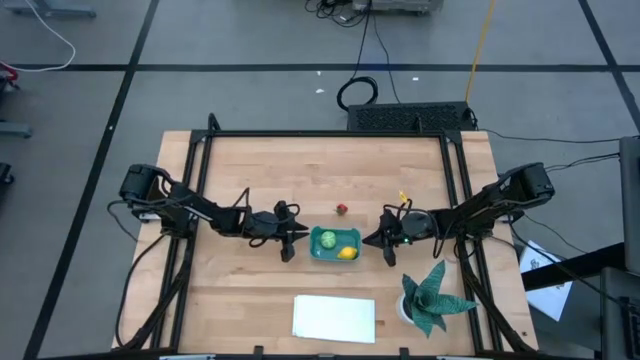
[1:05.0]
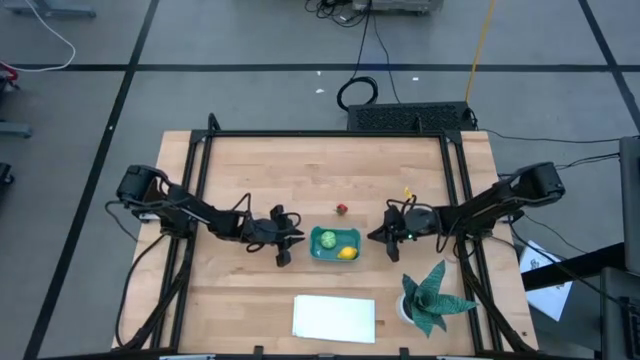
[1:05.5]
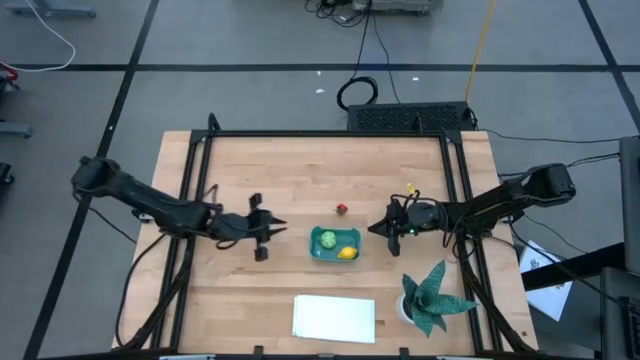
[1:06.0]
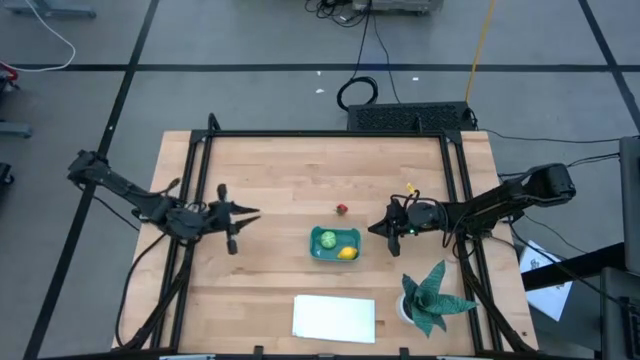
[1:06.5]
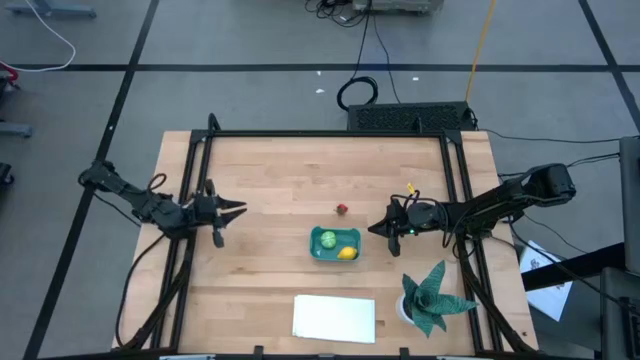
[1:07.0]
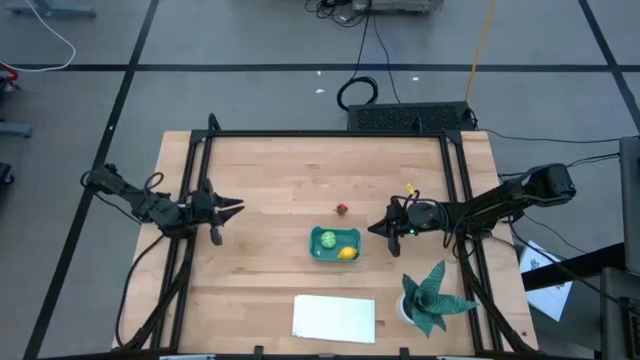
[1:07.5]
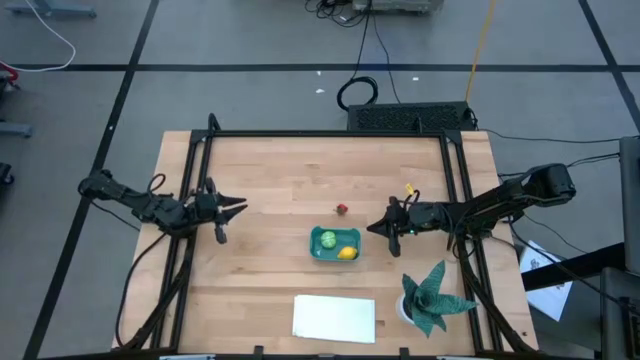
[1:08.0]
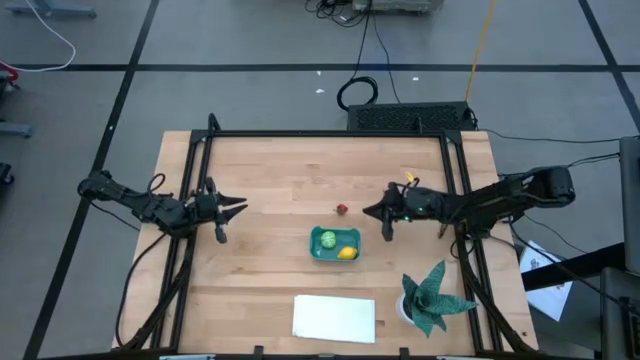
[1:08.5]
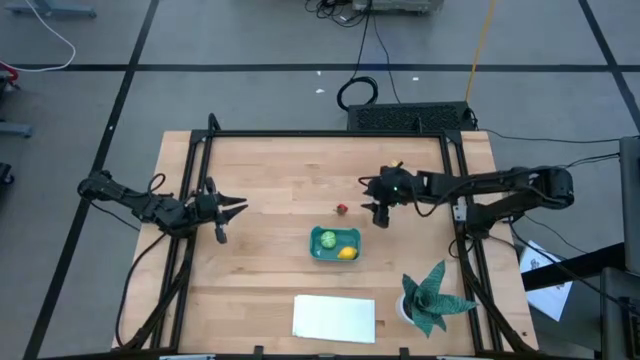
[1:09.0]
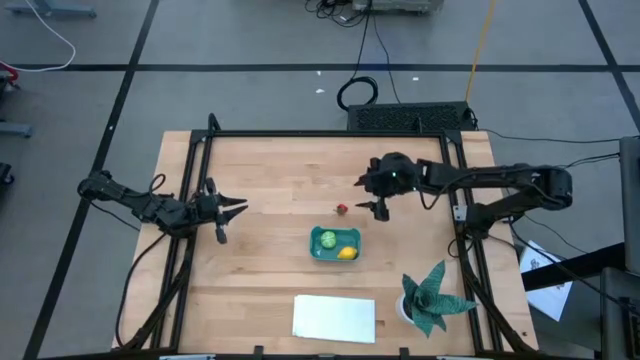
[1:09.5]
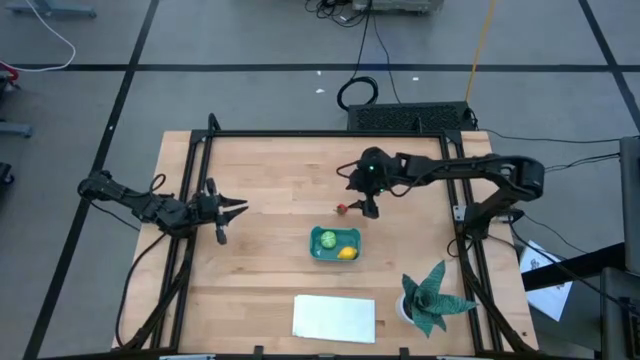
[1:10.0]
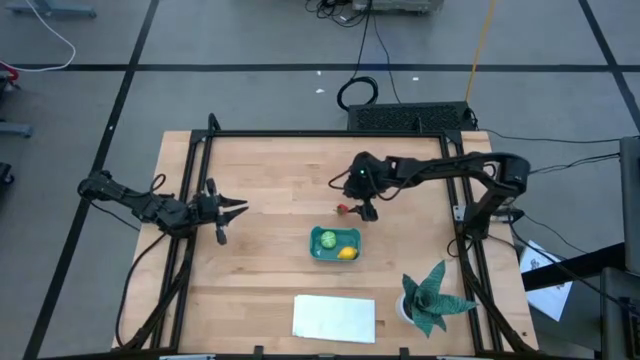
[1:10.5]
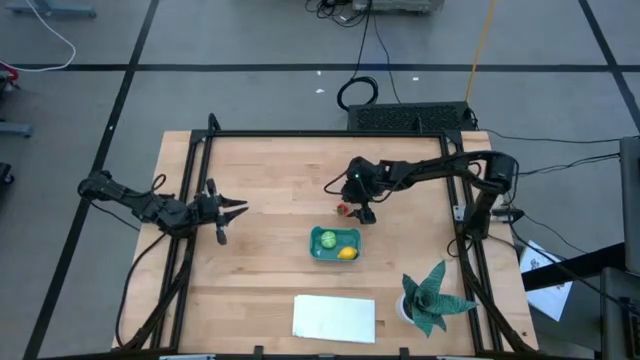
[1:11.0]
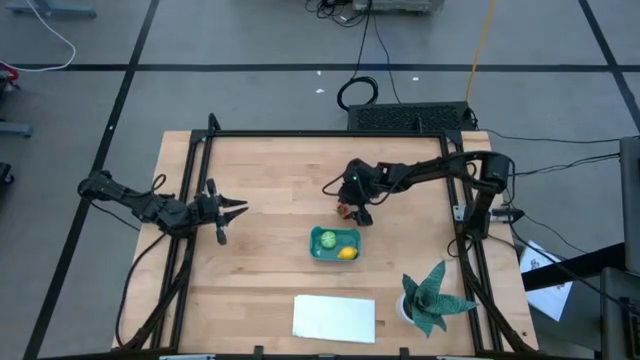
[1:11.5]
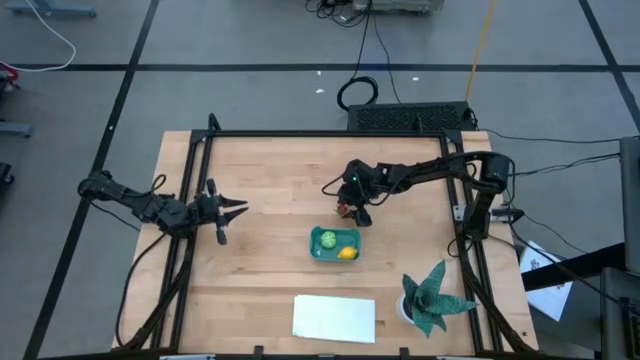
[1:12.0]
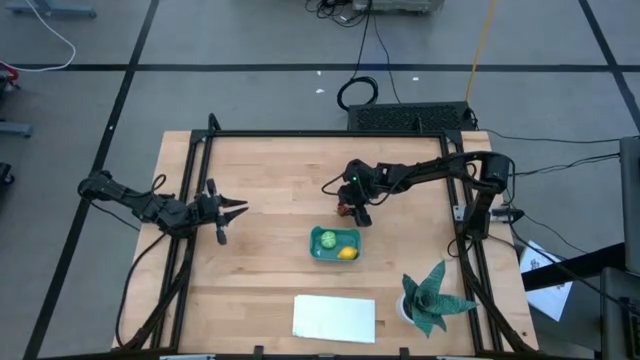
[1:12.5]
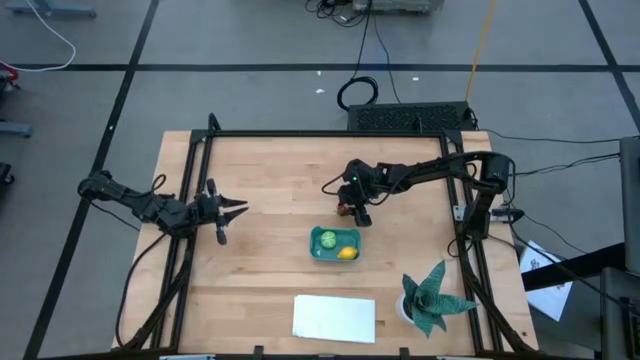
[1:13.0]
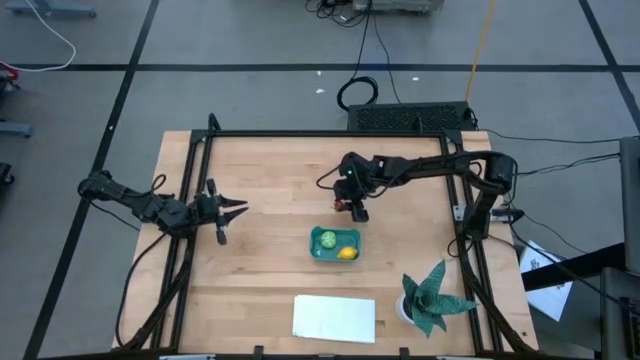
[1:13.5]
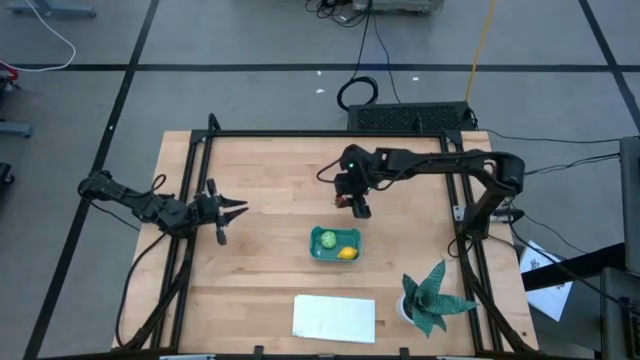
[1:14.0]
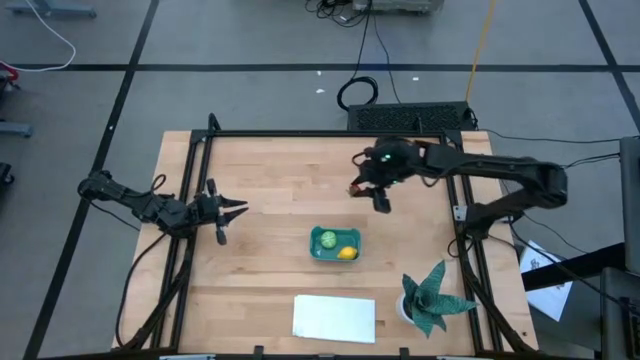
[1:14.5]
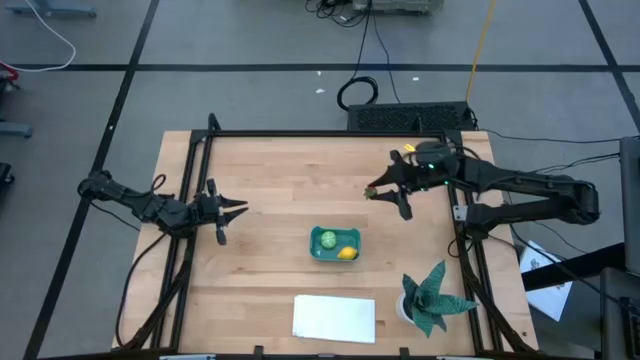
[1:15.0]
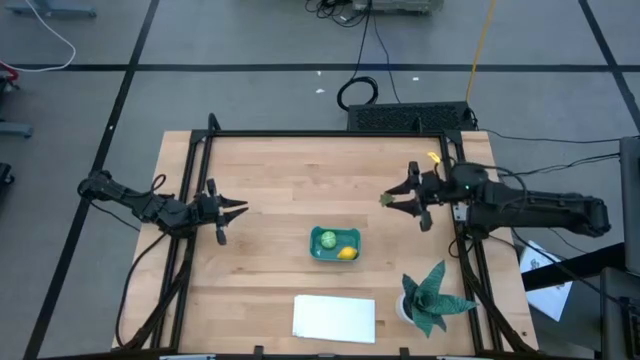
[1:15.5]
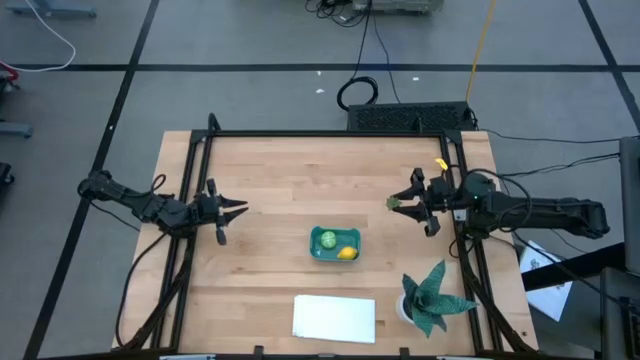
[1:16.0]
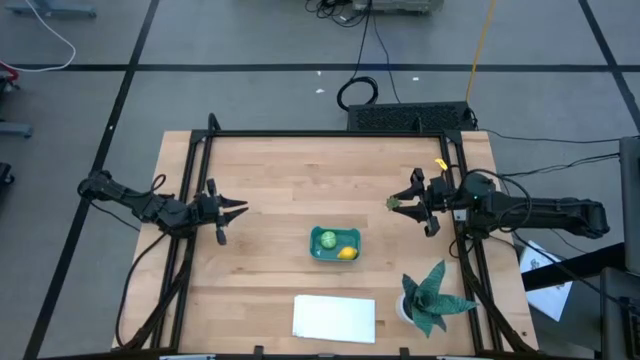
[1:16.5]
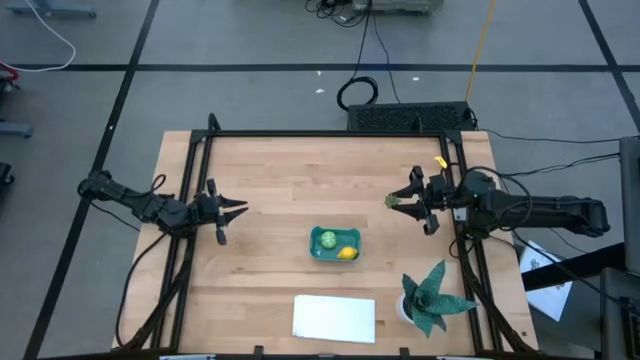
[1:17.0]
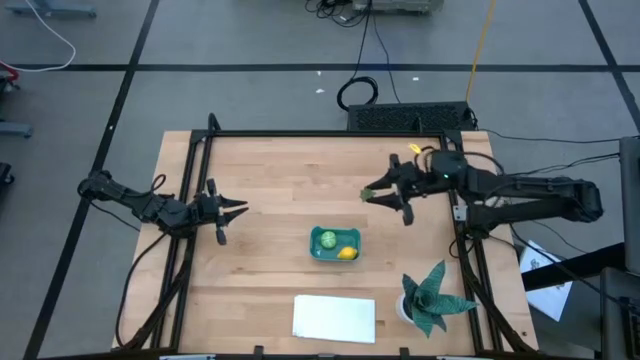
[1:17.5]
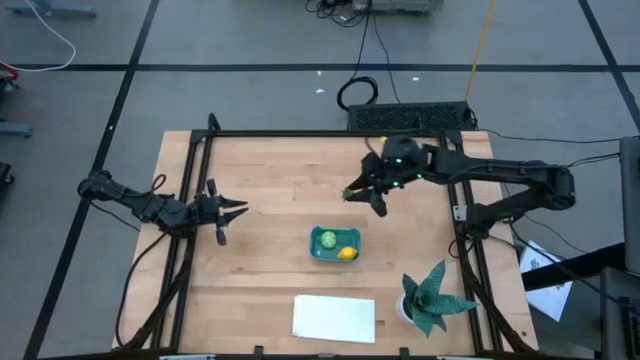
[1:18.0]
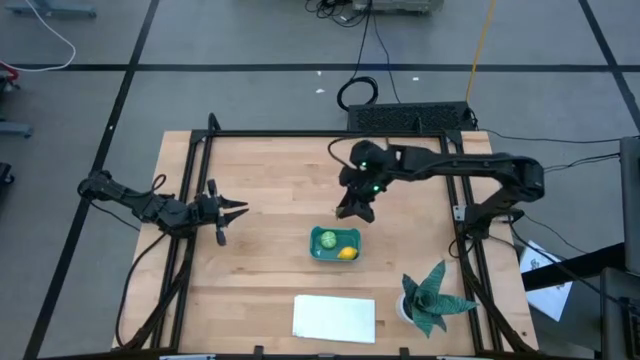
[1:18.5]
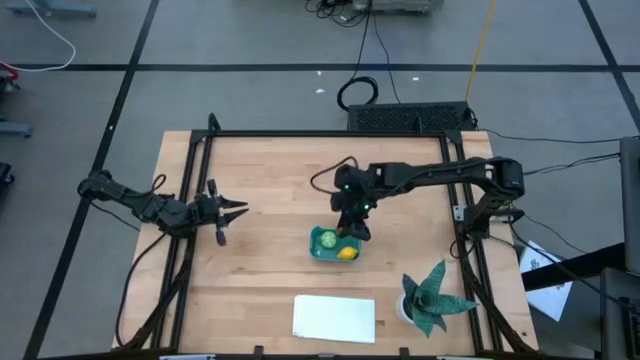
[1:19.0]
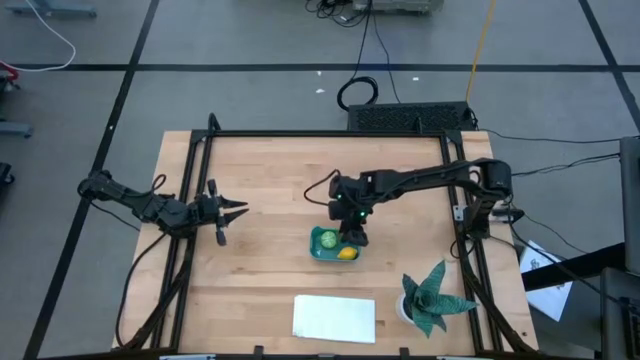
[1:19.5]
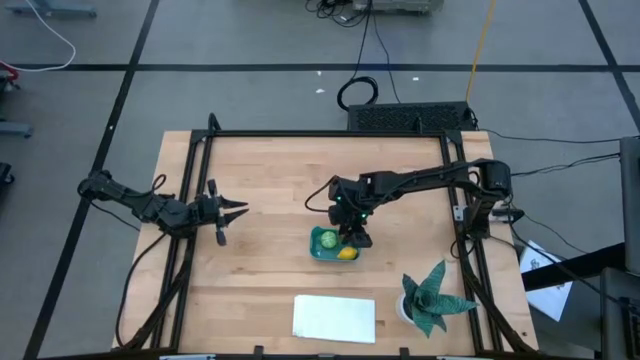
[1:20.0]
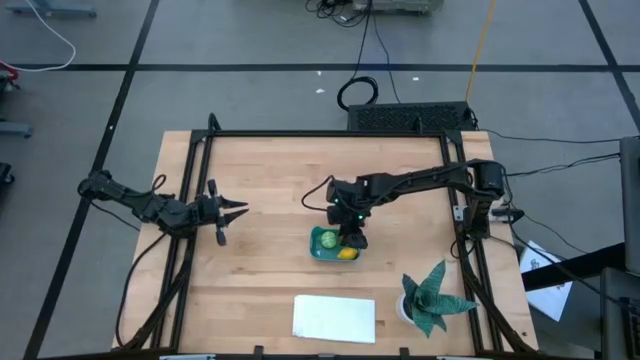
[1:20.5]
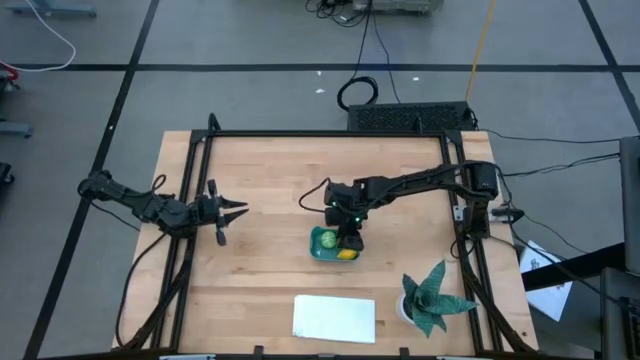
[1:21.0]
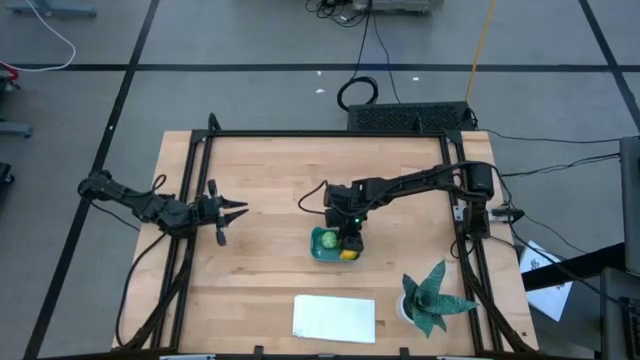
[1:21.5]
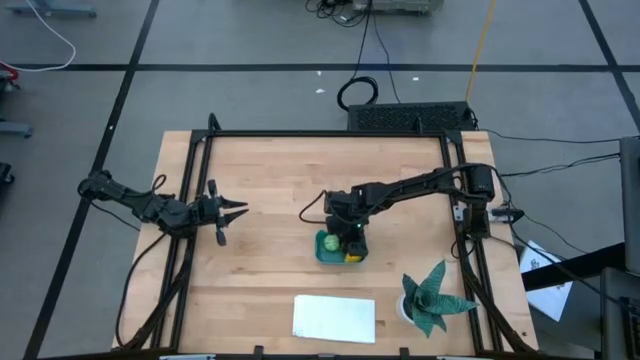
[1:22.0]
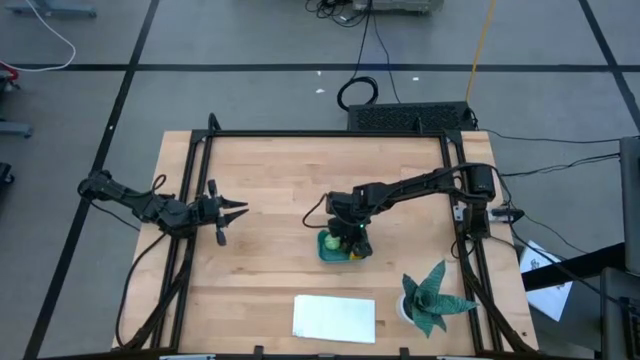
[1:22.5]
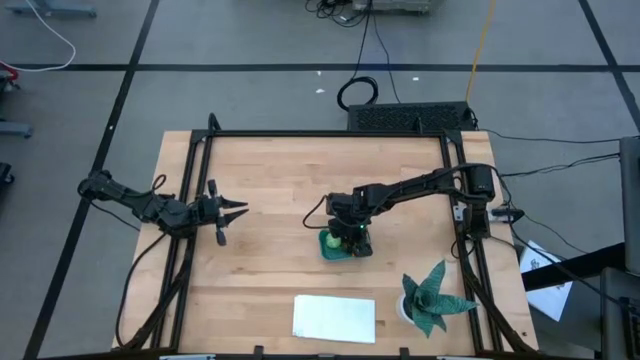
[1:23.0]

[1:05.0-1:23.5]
Task: Pick and placing Produce into tupperware
Put the strawberry into the bin

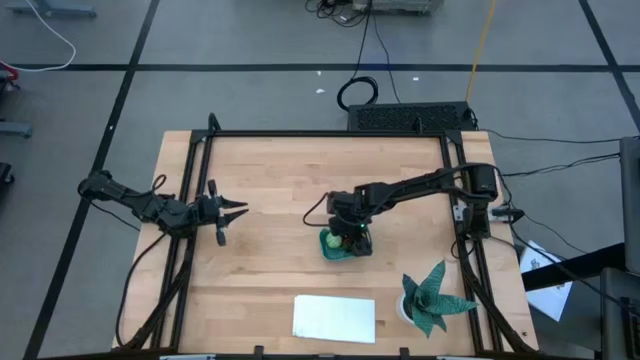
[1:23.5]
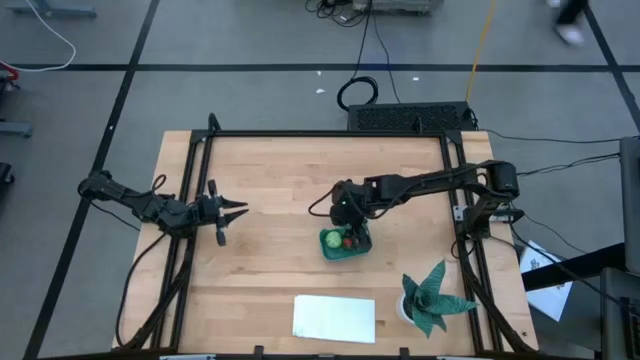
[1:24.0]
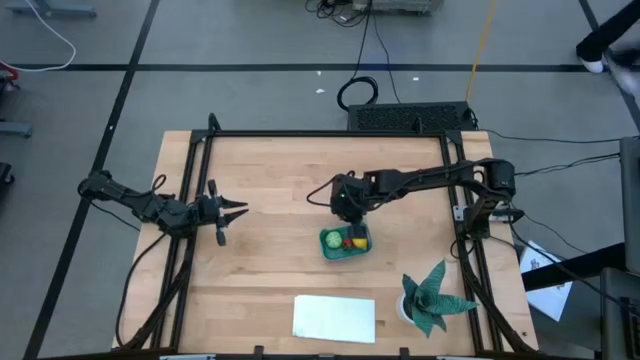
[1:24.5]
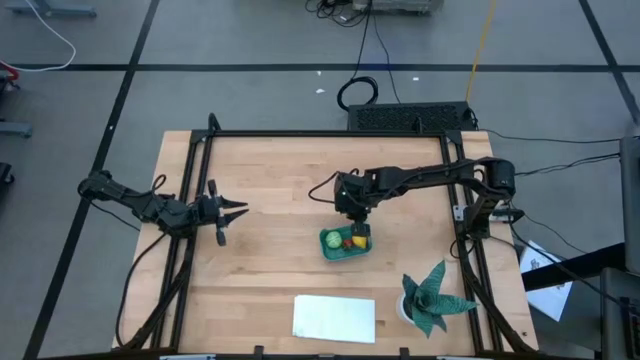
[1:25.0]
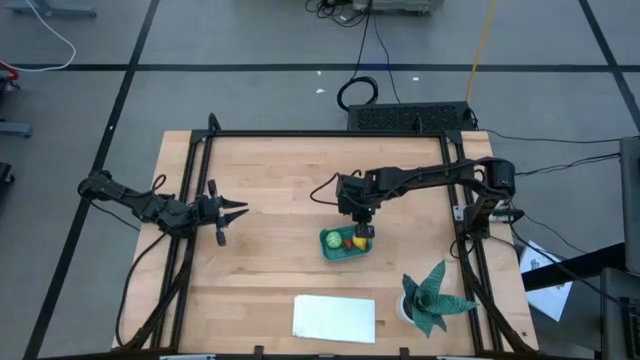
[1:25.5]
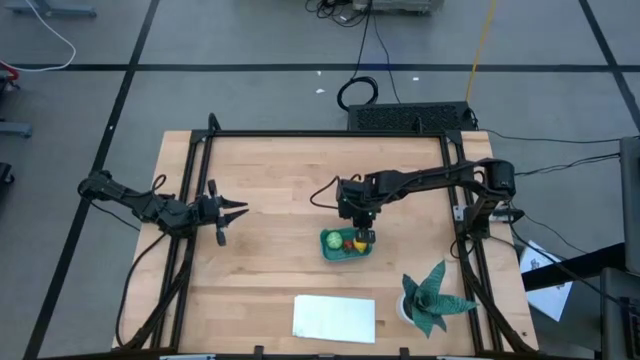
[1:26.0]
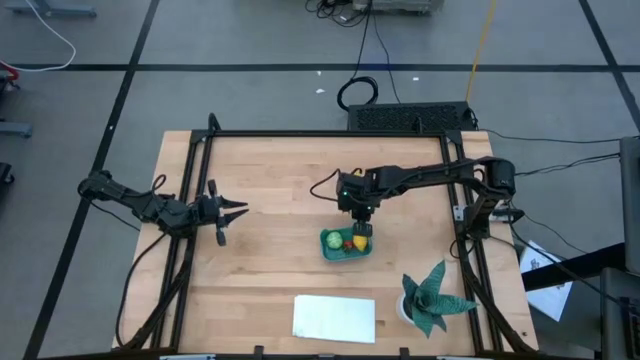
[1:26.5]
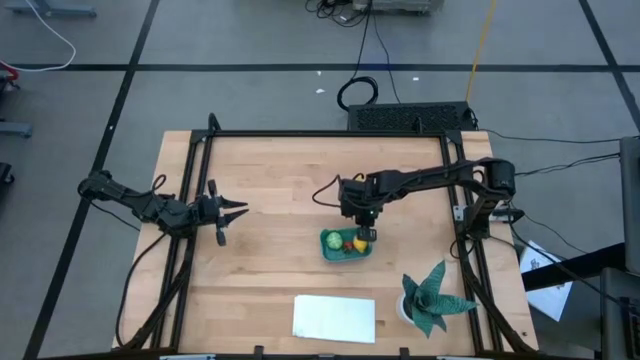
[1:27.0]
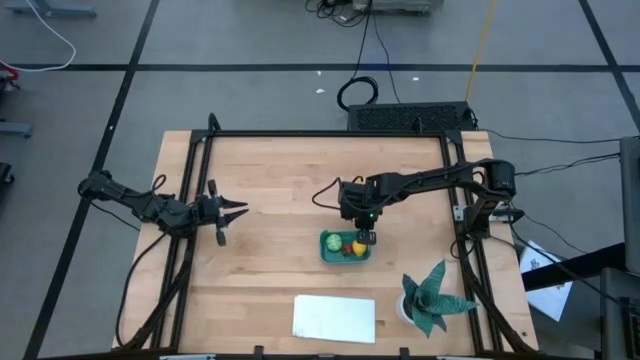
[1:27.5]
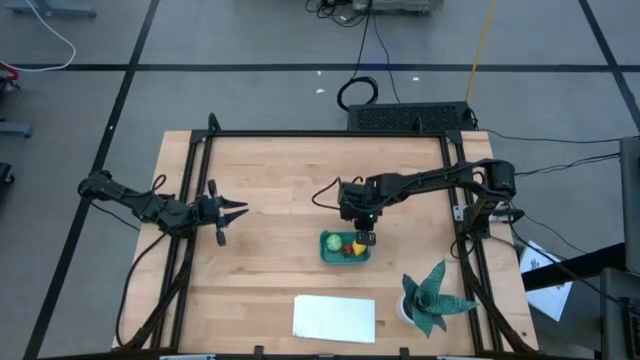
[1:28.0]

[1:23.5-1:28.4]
Adjust the bin on the table
